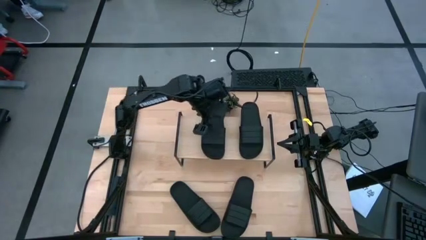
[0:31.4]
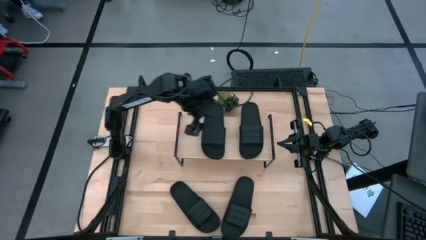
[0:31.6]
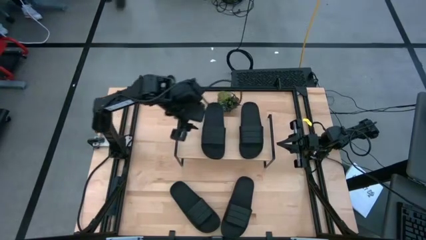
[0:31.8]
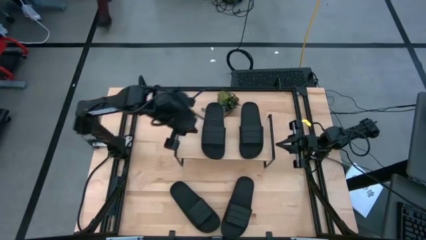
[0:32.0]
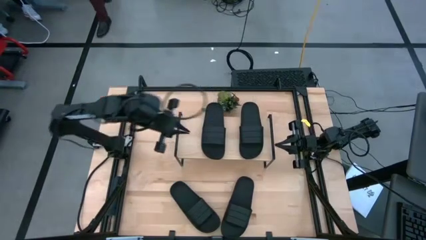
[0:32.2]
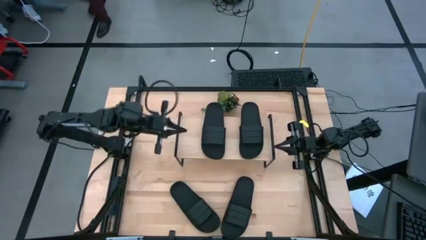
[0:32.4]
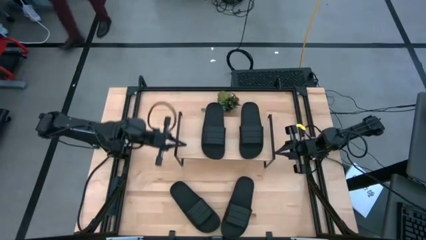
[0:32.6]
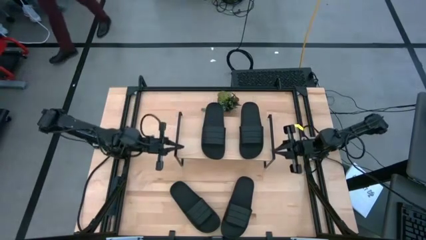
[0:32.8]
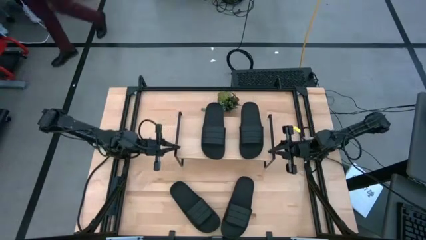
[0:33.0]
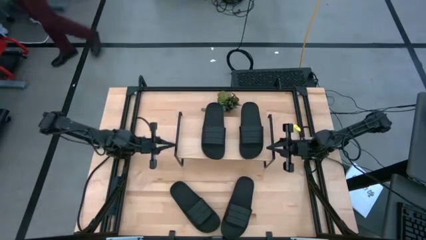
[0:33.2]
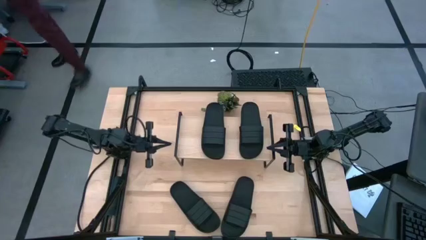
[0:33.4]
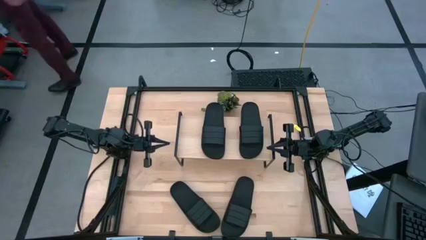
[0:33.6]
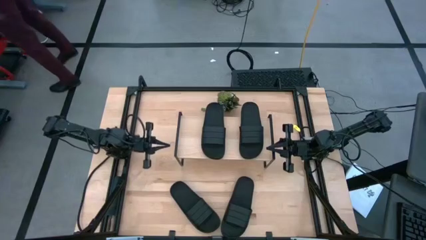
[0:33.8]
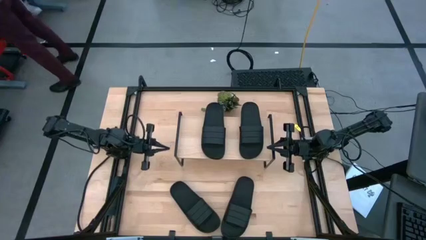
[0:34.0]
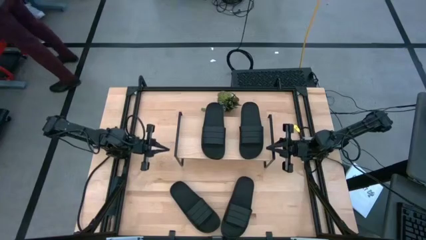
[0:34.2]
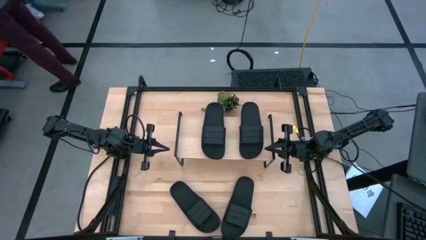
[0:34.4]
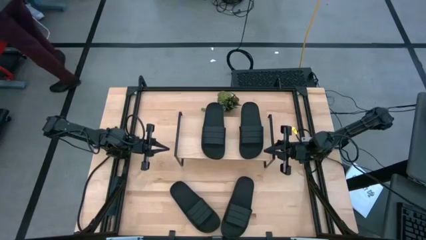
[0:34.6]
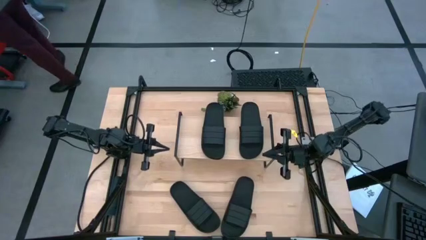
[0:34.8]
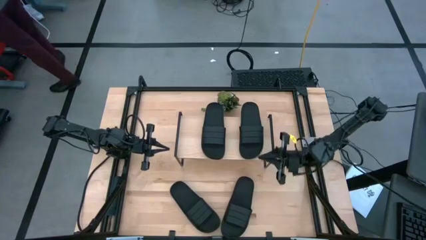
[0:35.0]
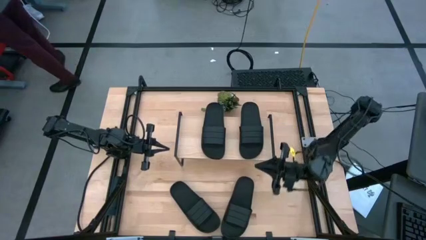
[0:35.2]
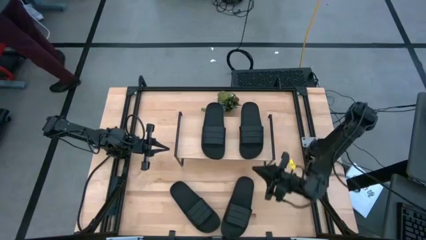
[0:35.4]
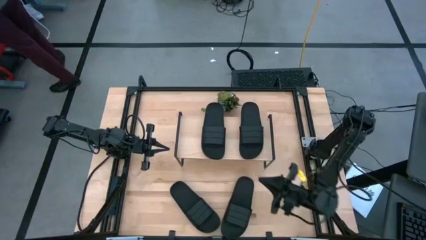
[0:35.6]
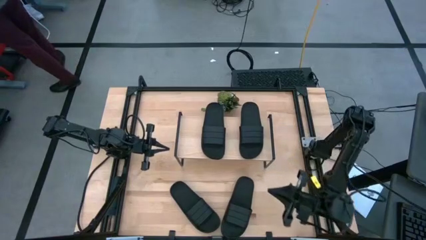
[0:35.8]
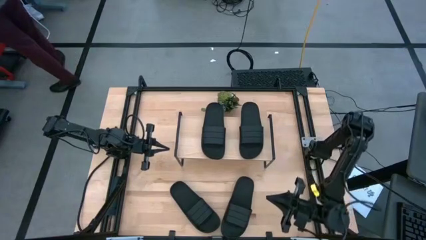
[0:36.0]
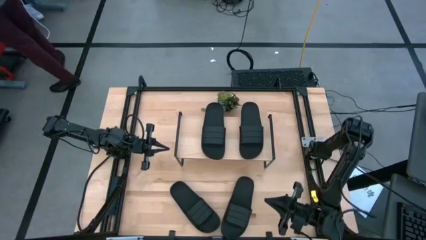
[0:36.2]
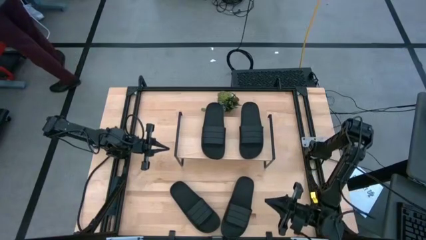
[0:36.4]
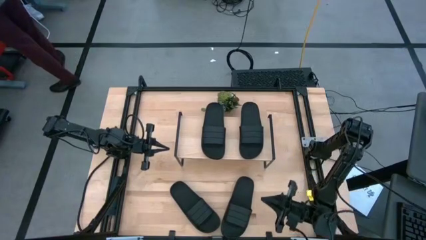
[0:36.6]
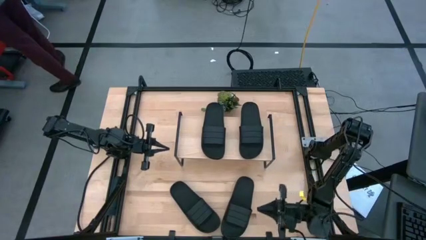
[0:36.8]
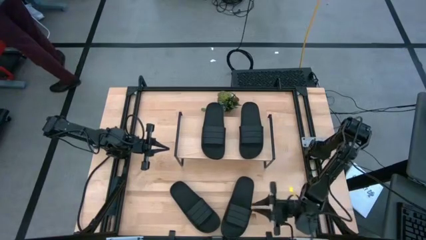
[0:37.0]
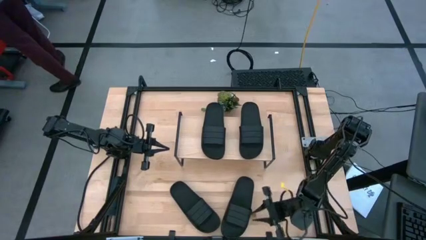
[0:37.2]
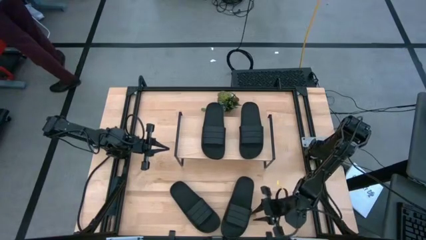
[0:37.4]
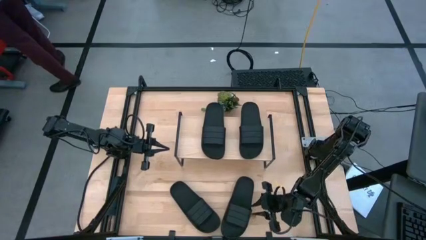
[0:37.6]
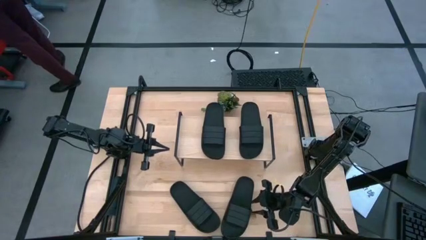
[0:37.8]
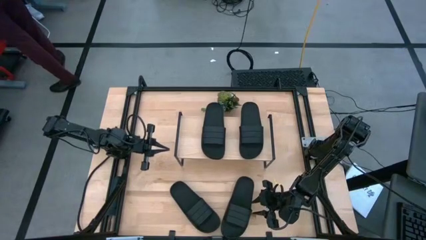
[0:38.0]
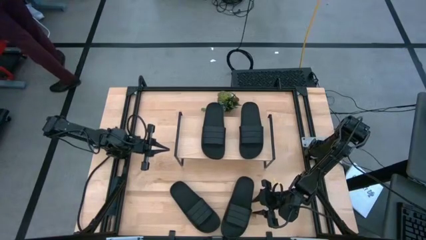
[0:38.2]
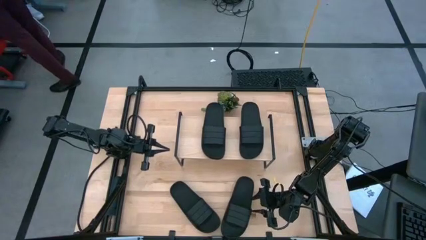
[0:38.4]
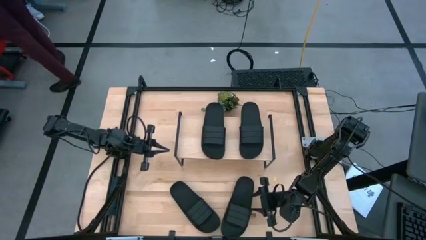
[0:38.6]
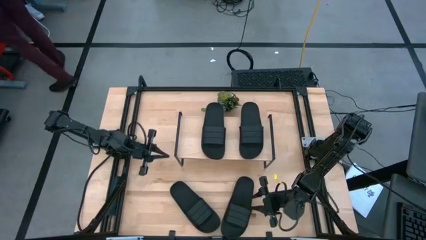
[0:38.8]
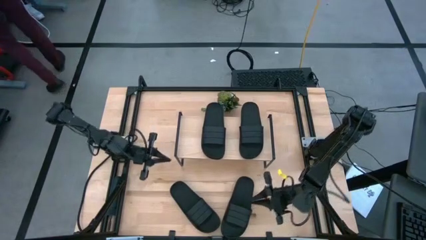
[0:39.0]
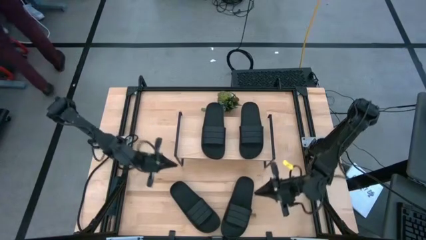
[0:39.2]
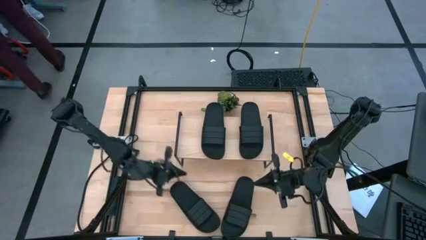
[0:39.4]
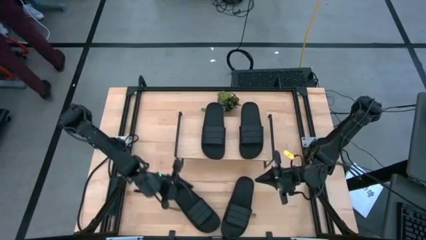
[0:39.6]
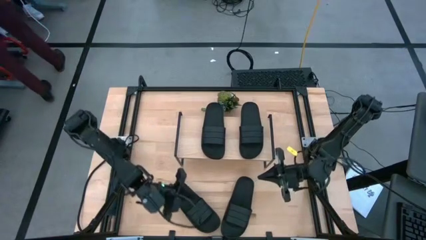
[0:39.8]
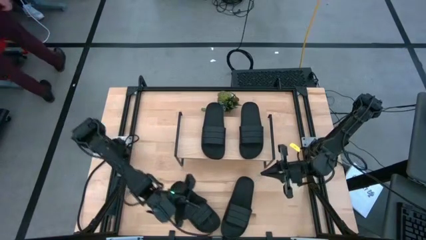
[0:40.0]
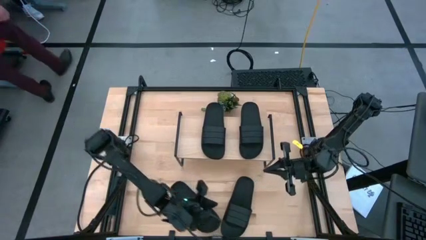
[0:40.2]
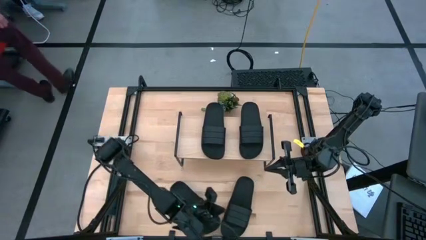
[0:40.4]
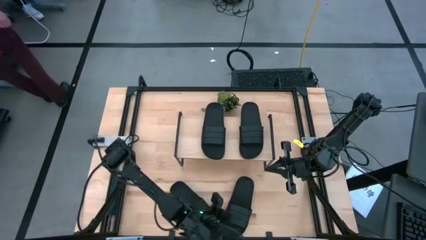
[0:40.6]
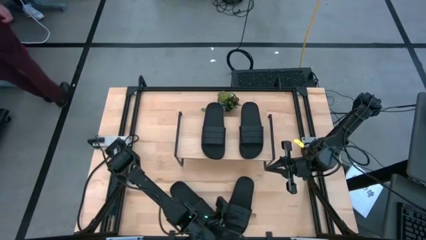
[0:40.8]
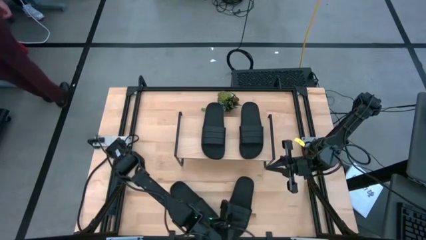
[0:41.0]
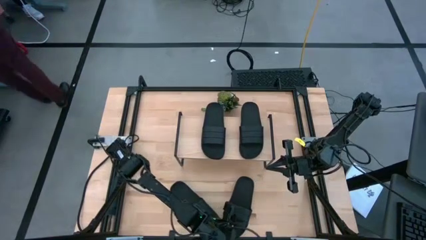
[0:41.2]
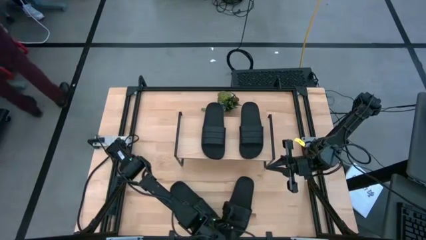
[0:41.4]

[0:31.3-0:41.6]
Task: Pick and place slides into the shelf
Put the black slipper under the shelf
